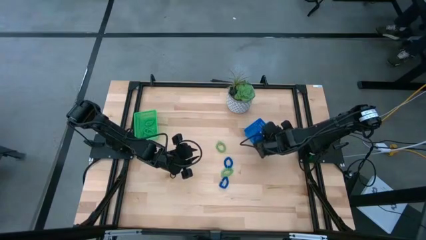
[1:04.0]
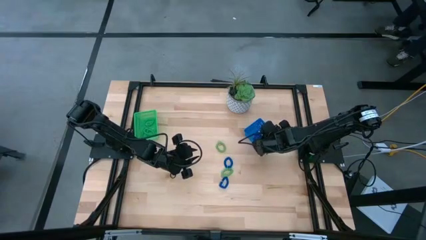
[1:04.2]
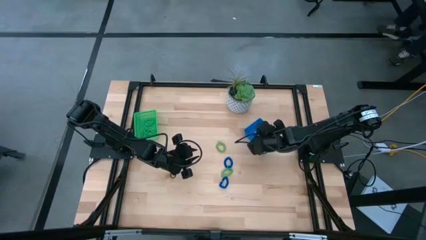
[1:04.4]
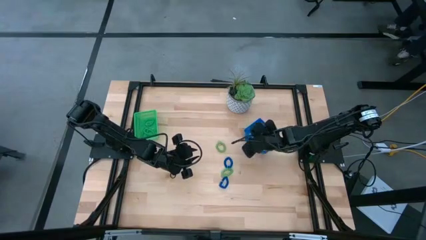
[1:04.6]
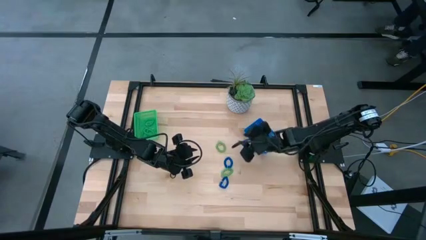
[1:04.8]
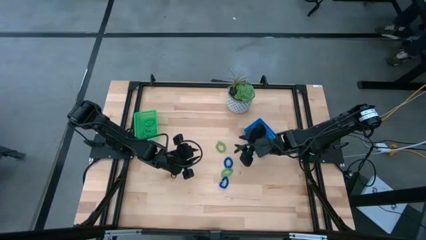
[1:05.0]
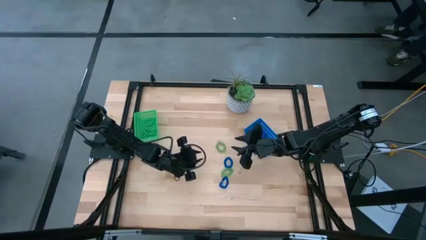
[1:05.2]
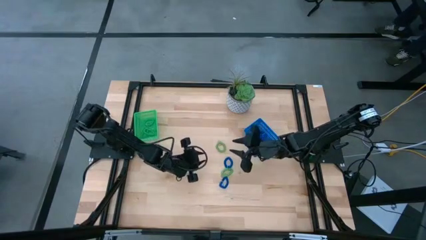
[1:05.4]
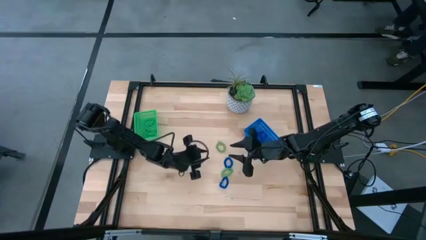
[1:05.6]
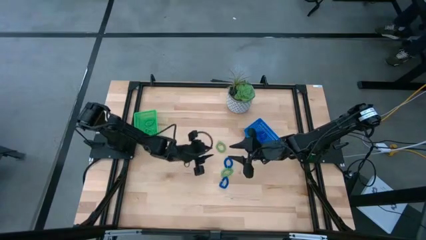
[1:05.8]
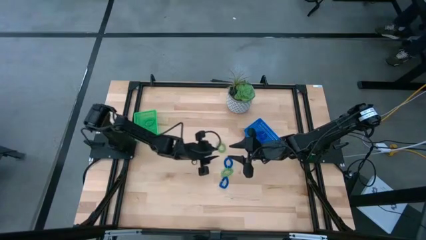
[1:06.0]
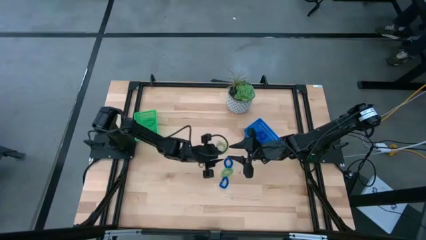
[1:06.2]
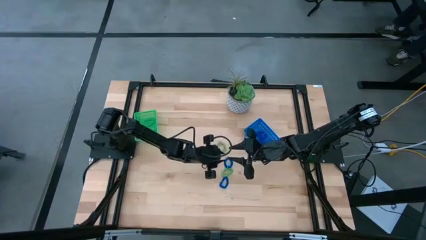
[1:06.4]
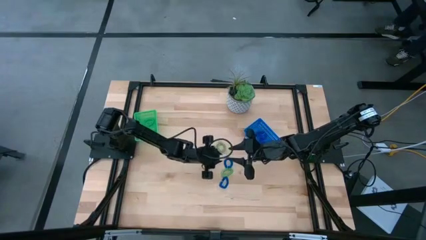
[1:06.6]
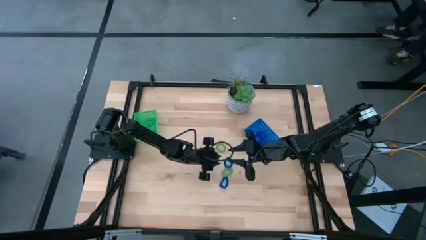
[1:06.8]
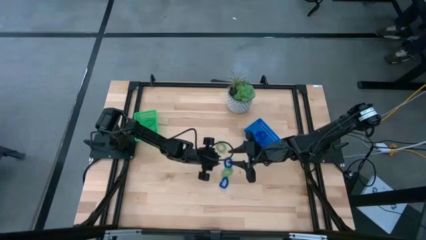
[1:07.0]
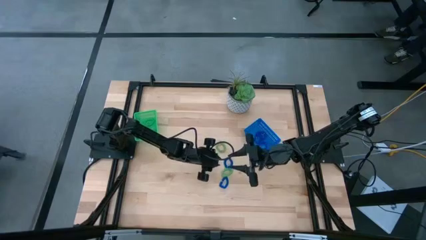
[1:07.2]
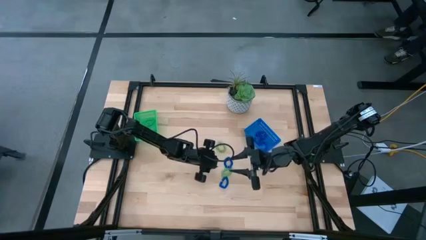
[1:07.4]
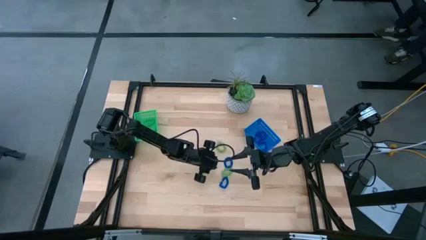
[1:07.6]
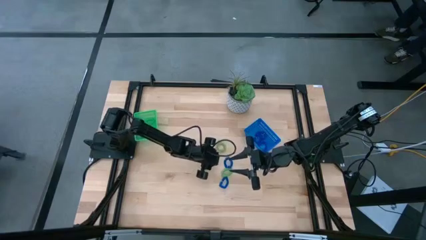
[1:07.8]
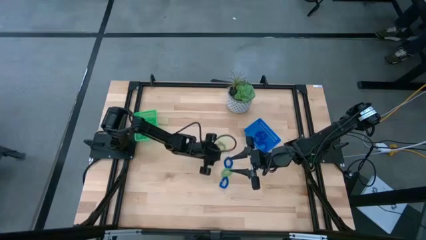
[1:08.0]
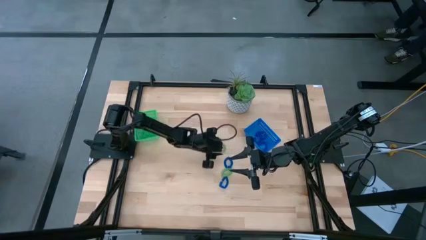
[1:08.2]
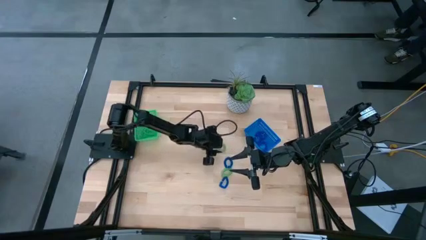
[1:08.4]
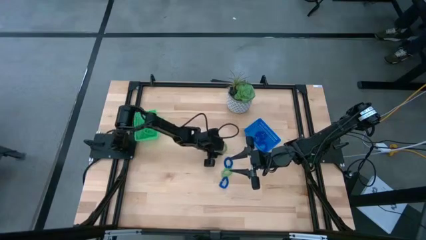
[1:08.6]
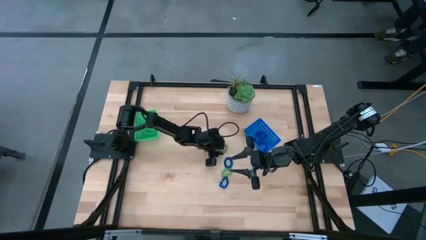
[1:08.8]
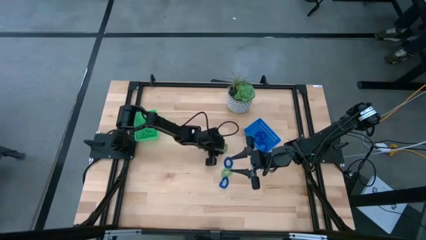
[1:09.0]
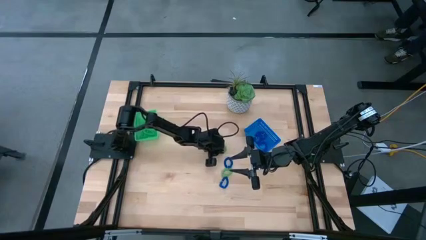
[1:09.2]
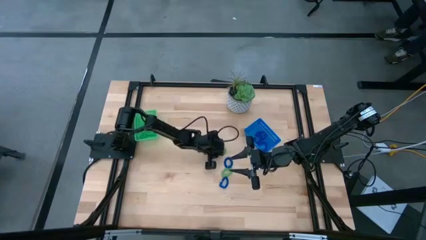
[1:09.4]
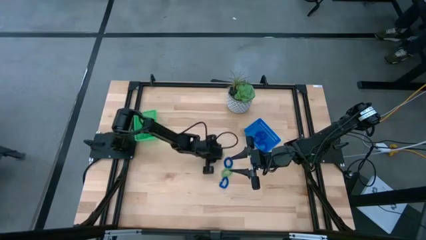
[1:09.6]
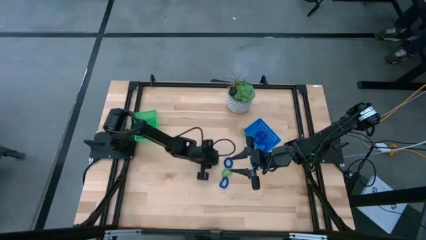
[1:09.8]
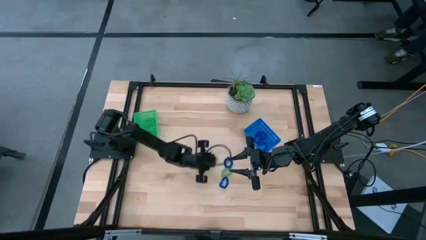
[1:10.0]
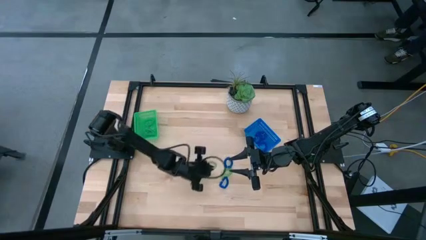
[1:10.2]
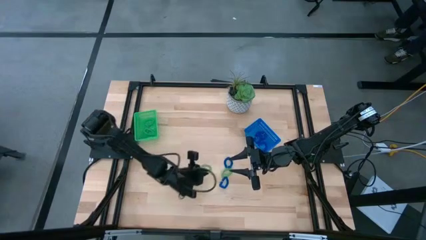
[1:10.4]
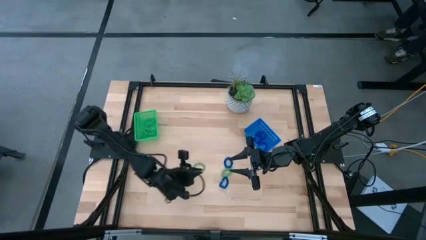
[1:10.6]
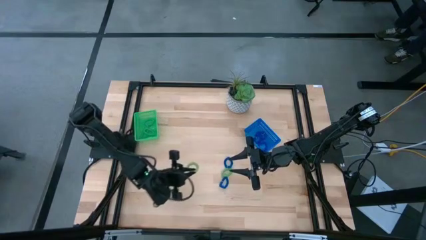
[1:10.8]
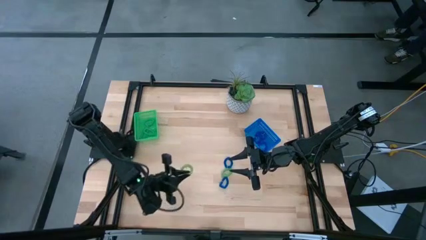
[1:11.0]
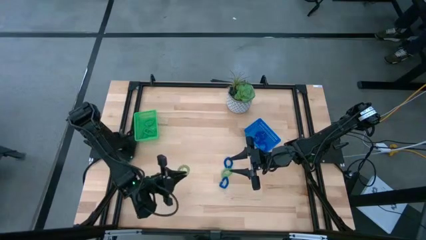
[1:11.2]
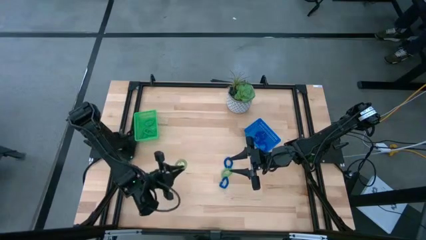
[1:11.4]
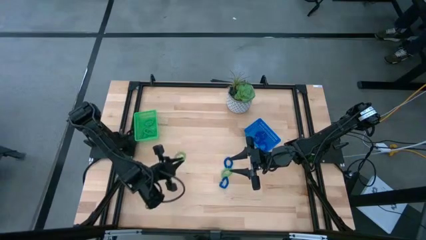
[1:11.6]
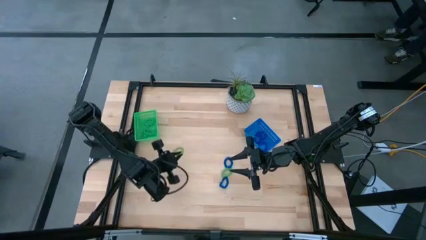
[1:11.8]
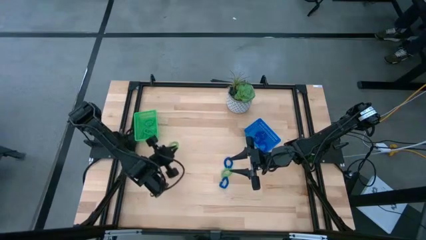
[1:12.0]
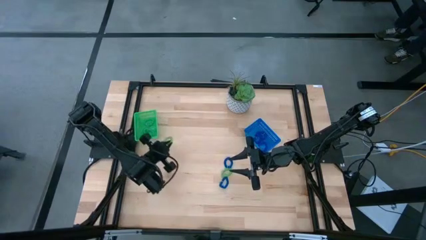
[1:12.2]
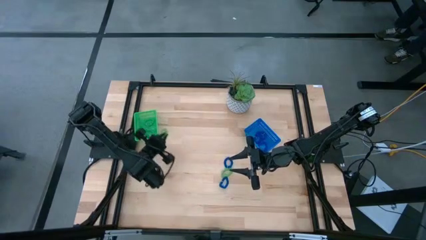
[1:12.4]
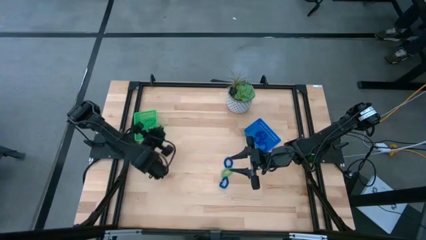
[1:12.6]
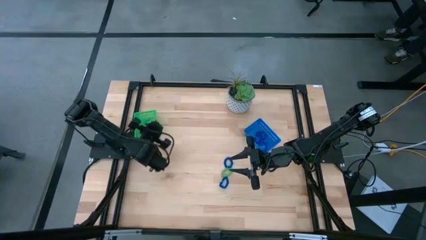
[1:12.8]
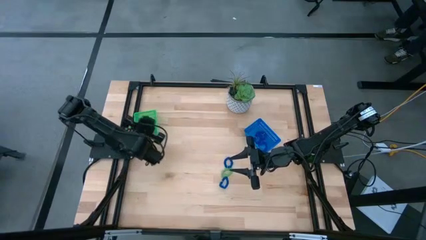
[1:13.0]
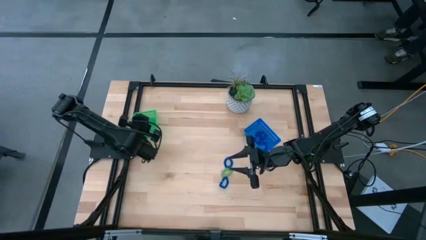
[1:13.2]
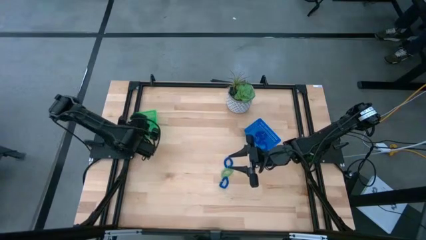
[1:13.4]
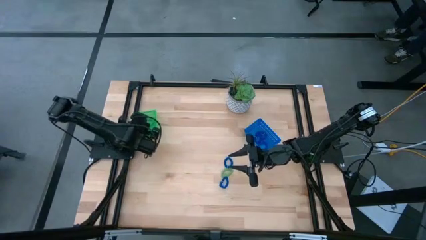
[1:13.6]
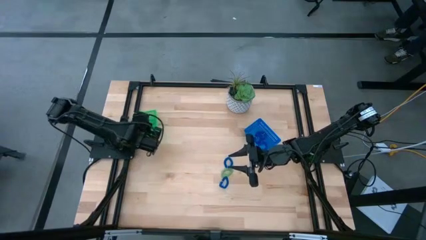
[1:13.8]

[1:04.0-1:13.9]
Task: Sort spring keychains
Put the green spring keychain in the green bin

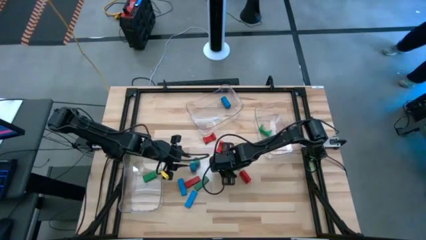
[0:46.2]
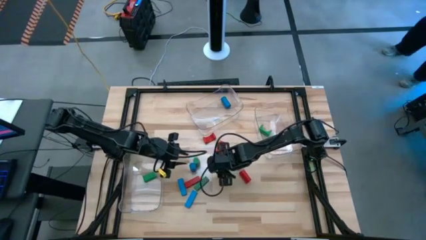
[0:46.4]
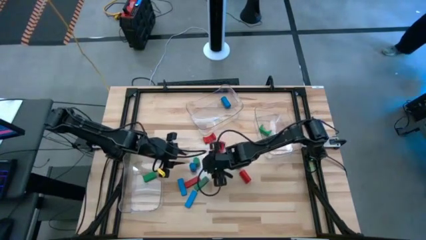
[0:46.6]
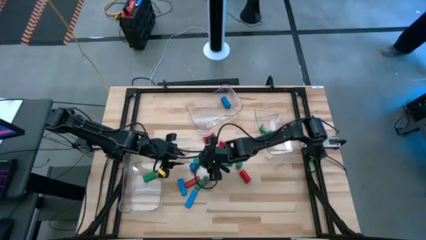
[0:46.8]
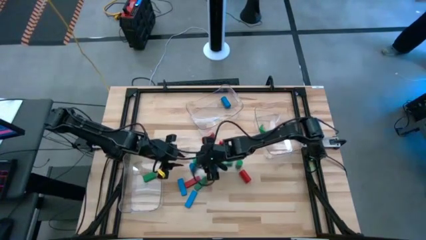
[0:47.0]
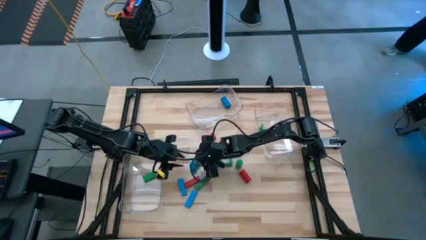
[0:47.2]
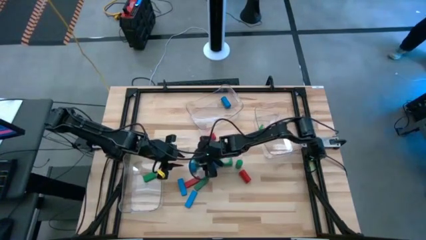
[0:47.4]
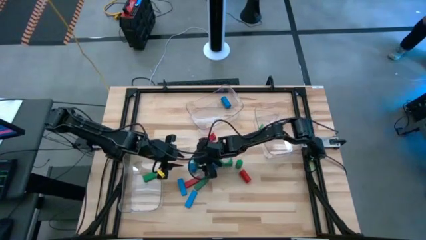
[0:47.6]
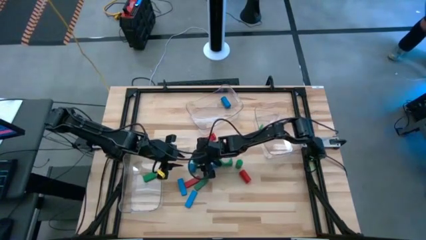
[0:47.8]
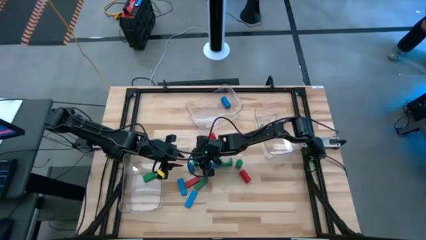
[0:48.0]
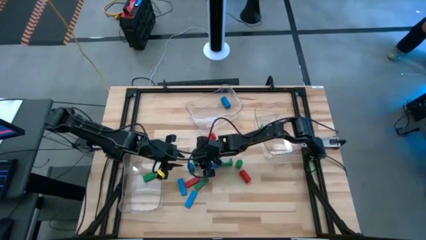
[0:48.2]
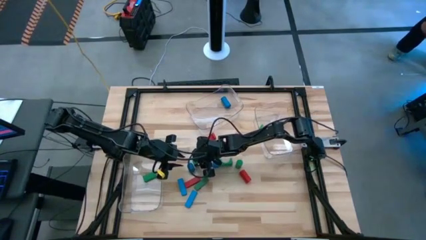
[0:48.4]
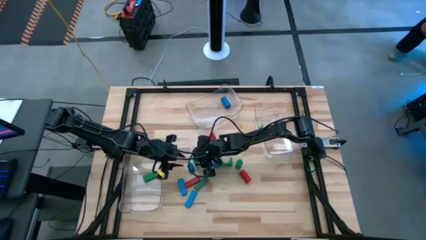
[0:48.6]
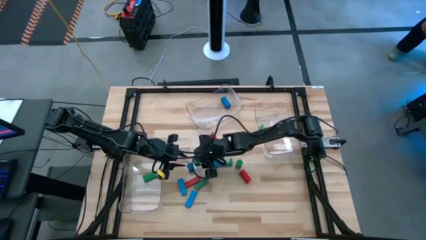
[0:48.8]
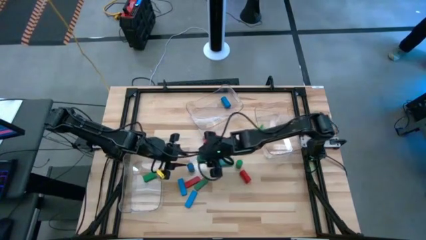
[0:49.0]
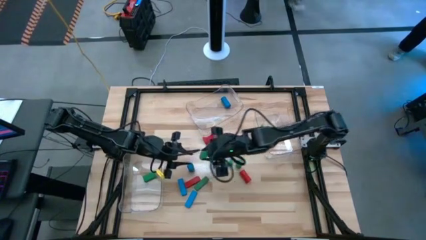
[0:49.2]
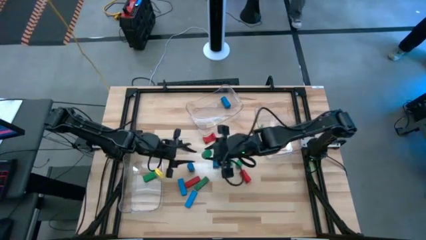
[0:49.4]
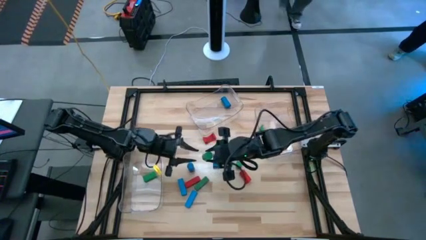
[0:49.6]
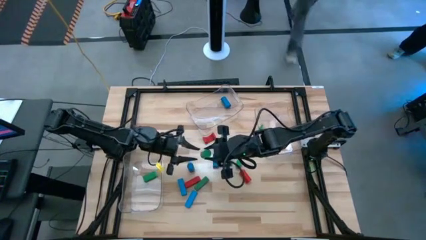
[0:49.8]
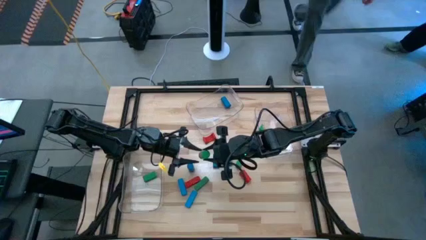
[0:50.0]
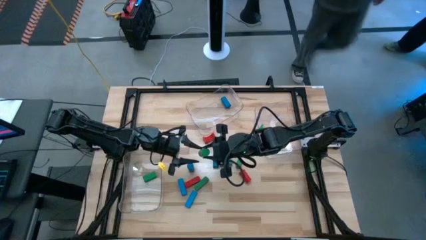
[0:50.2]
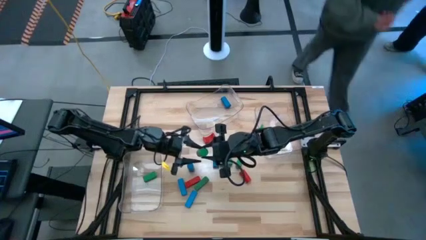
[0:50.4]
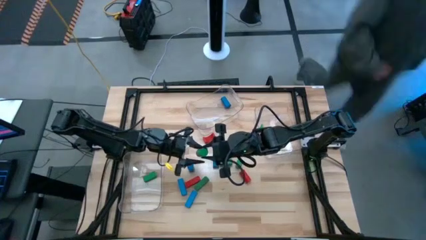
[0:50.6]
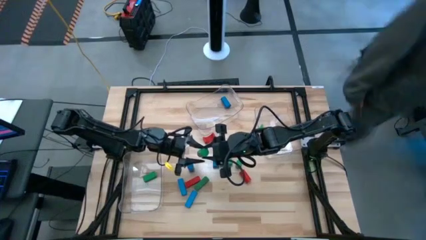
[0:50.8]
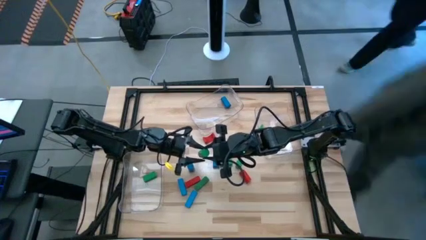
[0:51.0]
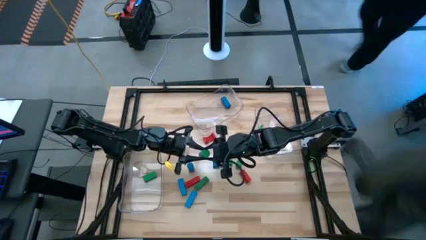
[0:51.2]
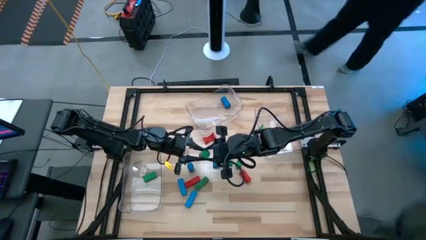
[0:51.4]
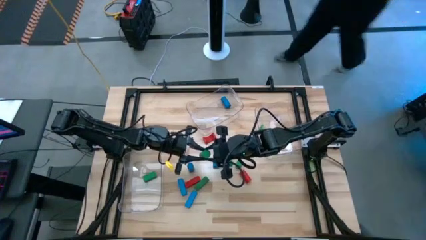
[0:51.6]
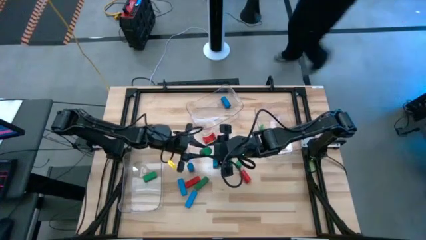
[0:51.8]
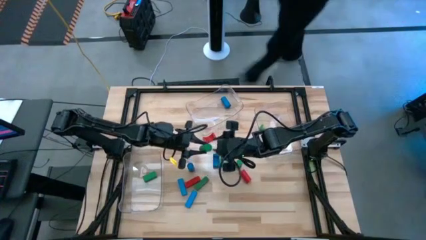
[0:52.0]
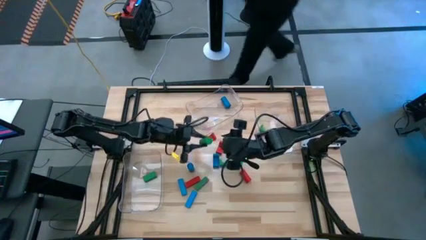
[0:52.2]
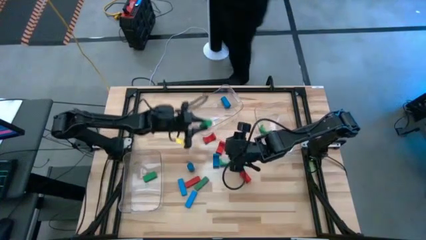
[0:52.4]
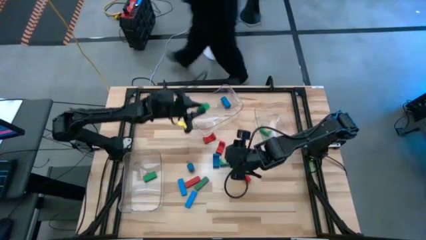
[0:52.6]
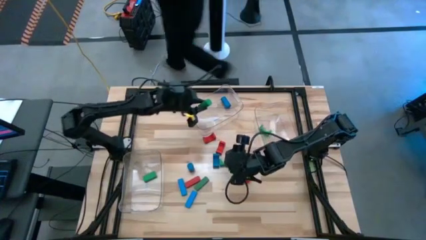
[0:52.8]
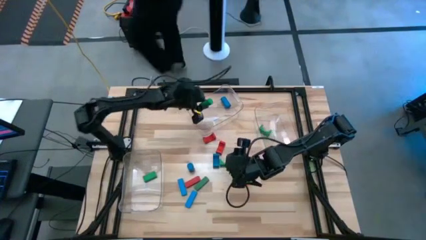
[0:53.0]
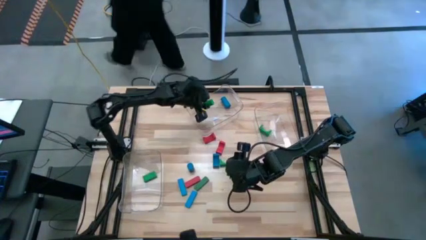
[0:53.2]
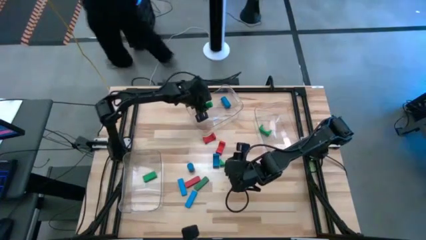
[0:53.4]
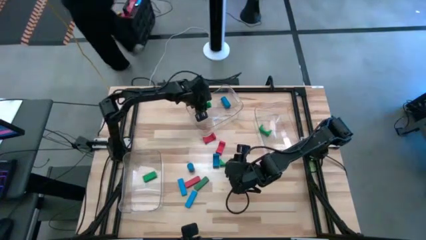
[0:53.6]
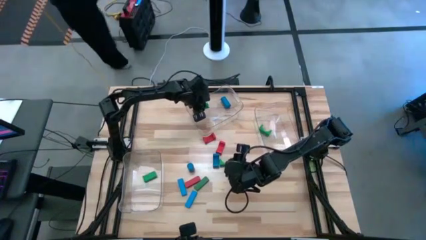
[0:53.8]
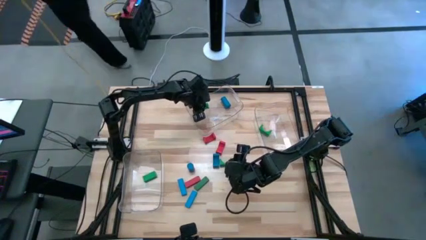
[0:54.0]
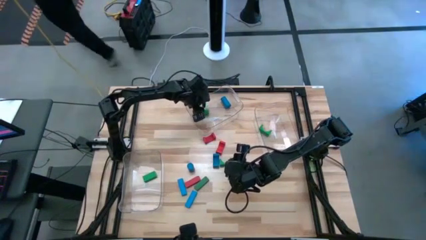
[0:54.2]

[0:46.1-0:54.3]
Task: Sort blocks by size
Put the green cylinder block into the top transparent bin
